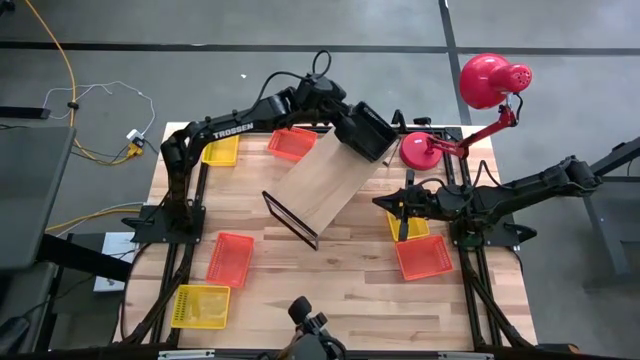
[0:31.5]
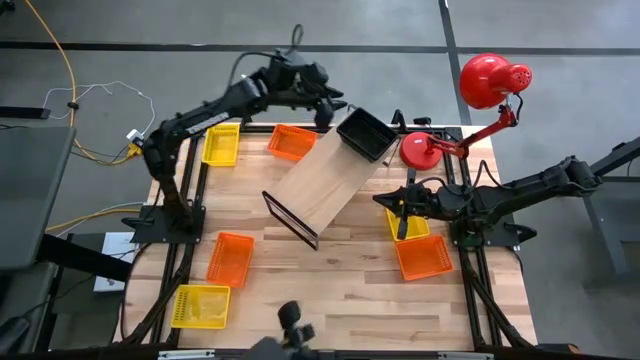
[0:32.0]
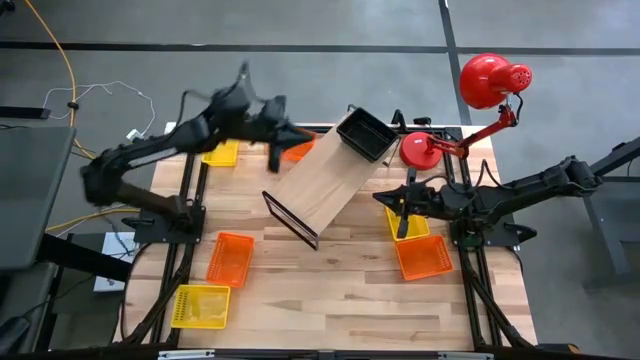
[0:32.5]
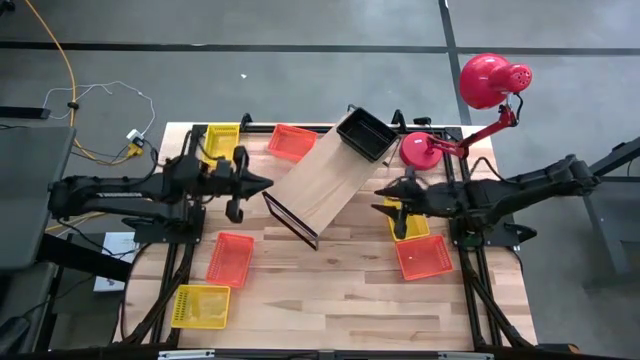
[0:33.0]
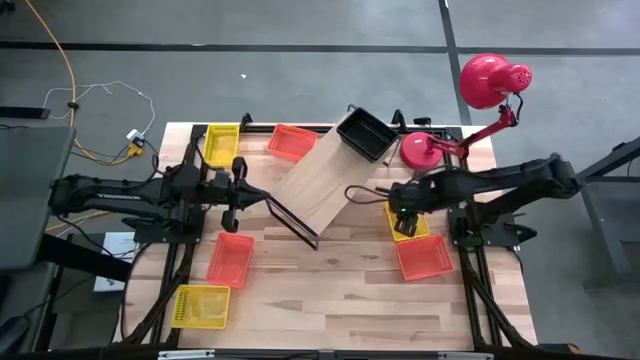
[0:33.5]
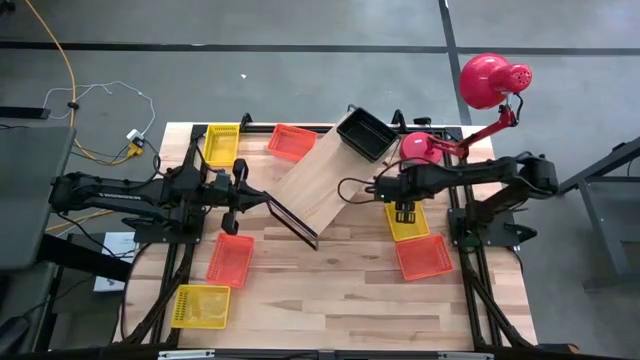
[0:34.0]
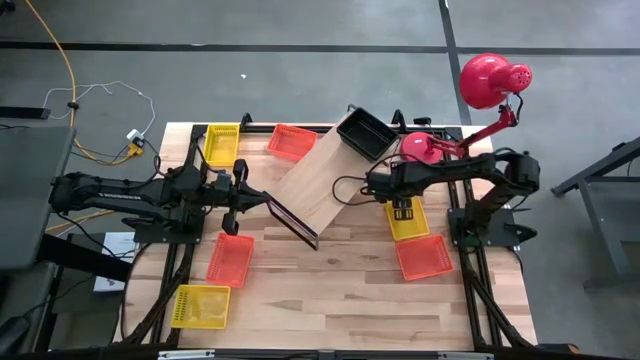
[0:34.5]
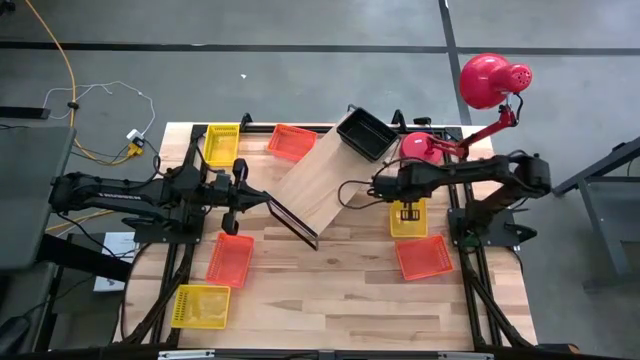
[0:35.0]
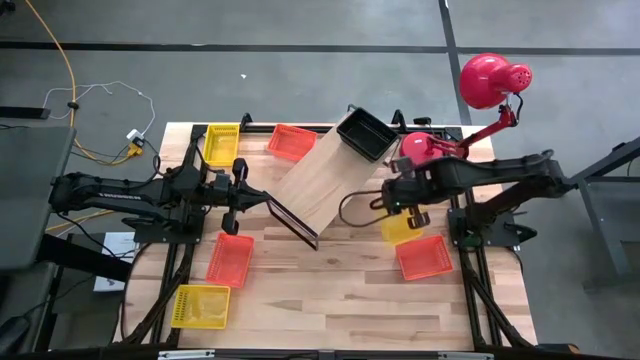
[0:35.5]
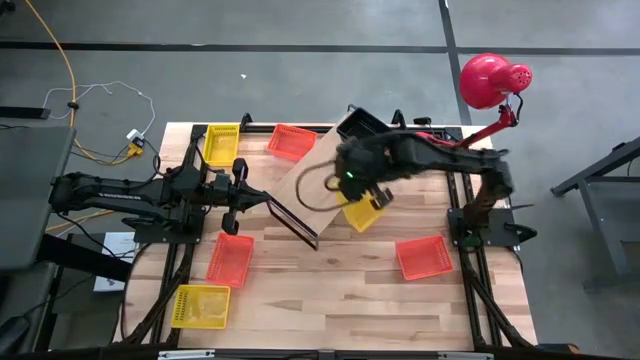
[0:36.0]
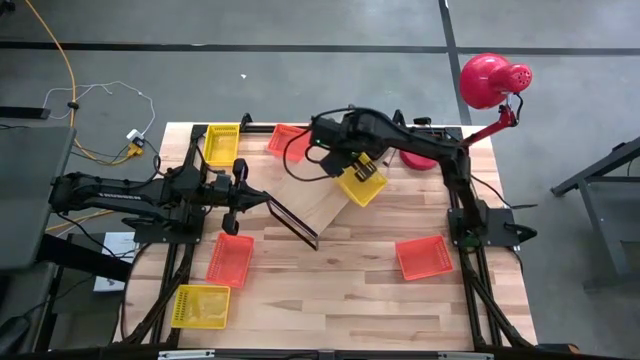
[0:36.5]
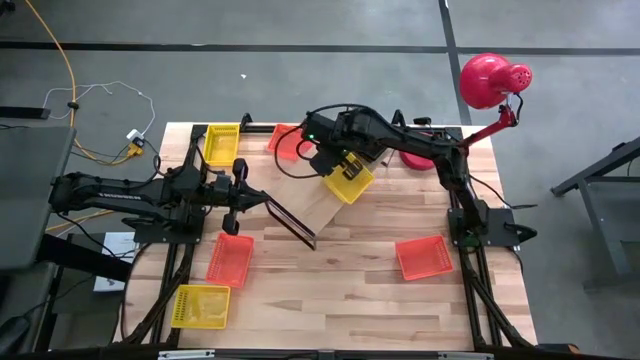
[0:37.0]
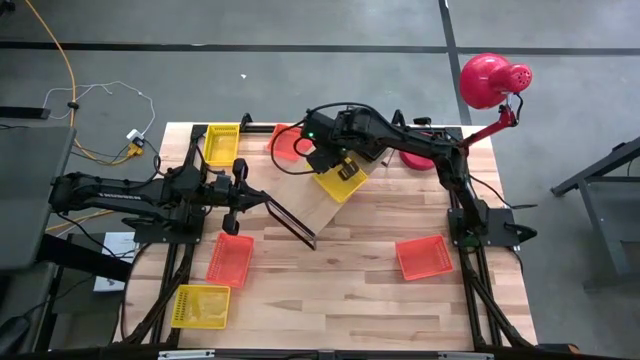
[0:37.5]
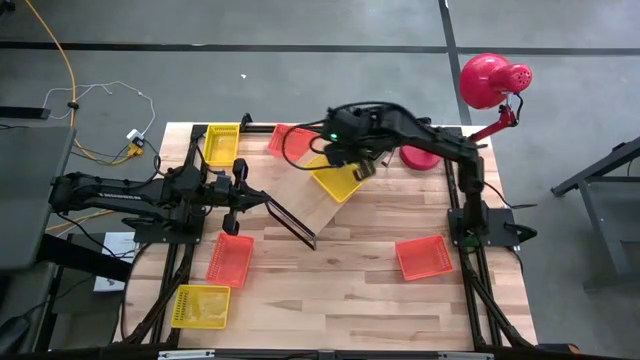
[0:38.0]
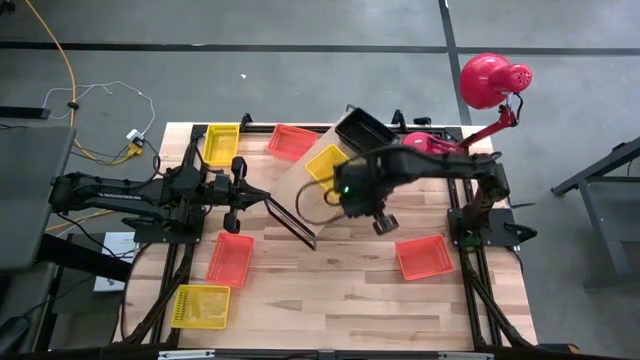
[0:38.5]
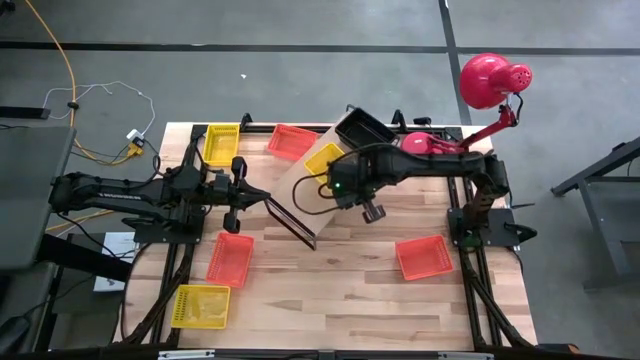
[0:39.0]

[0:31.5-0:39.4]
Task: Stack baskets on shelf by color
Put the middle right yellow basket on the shelf

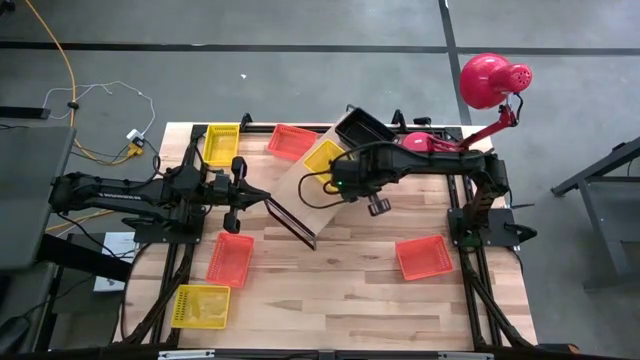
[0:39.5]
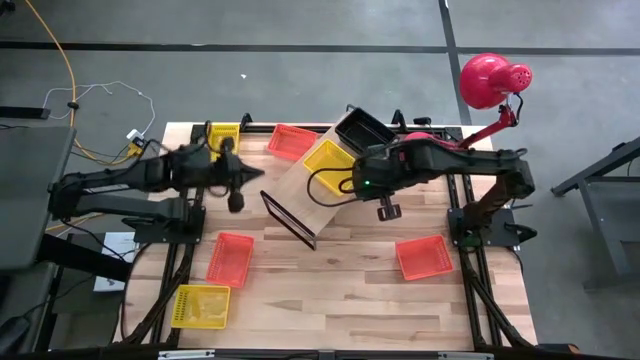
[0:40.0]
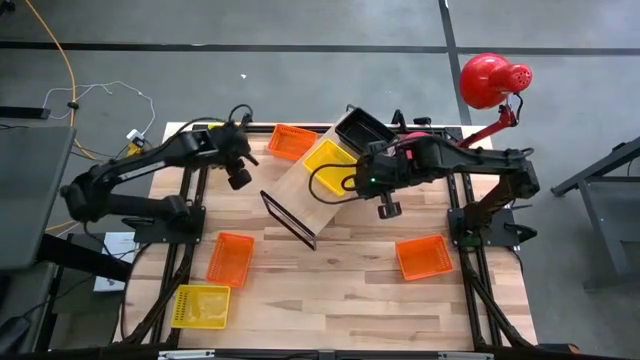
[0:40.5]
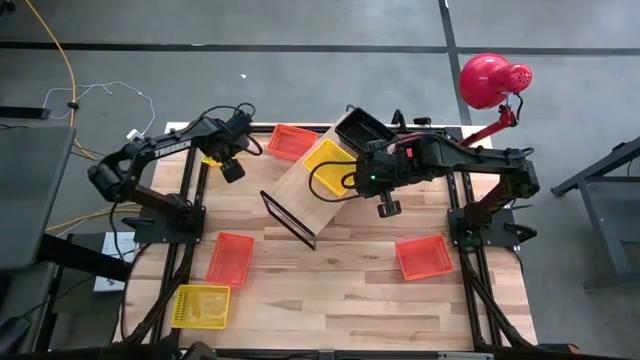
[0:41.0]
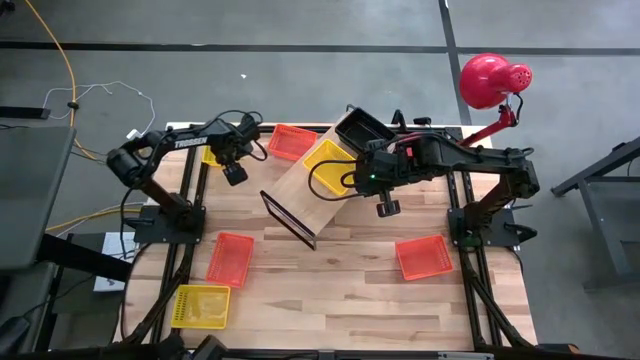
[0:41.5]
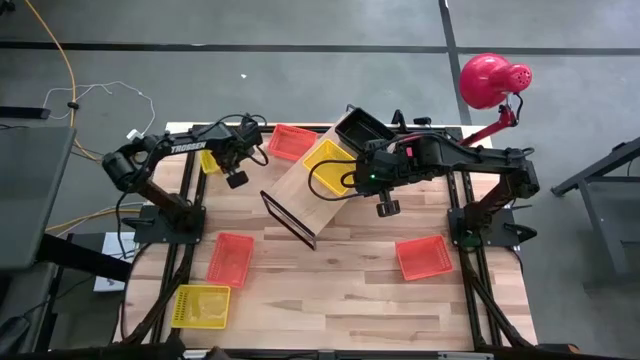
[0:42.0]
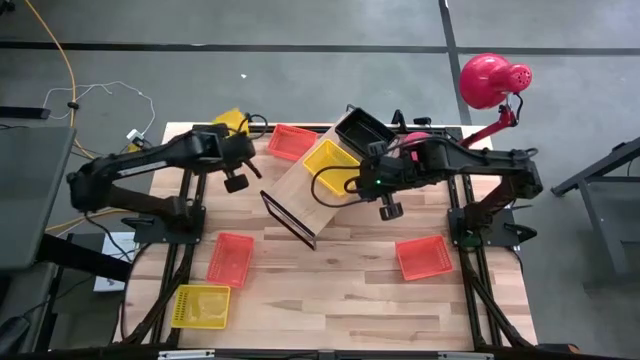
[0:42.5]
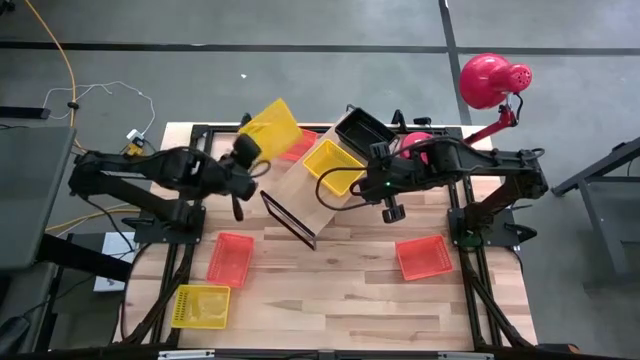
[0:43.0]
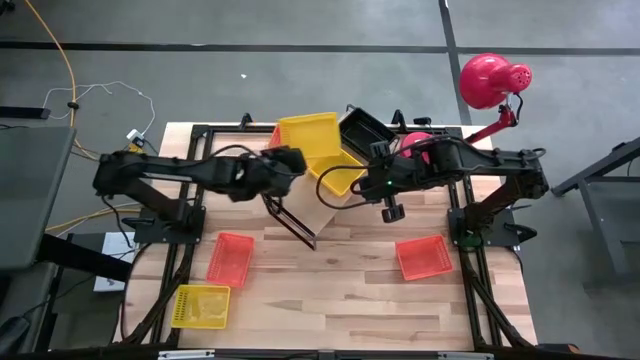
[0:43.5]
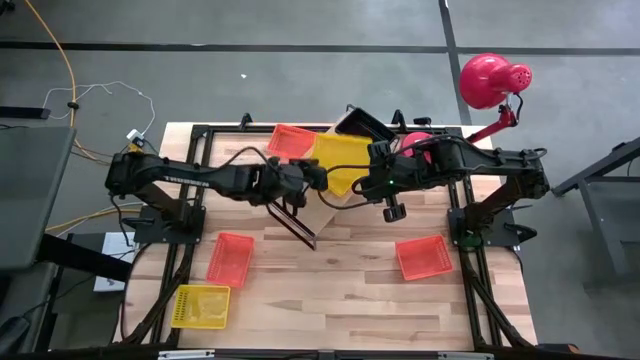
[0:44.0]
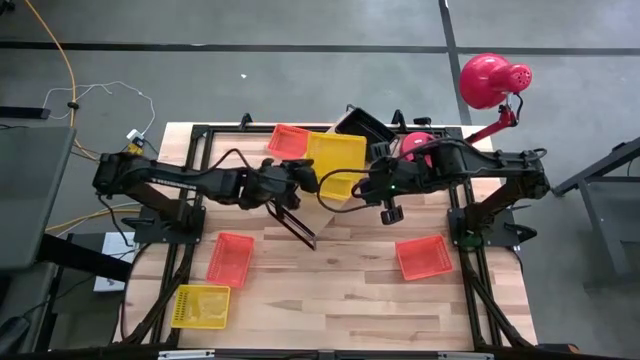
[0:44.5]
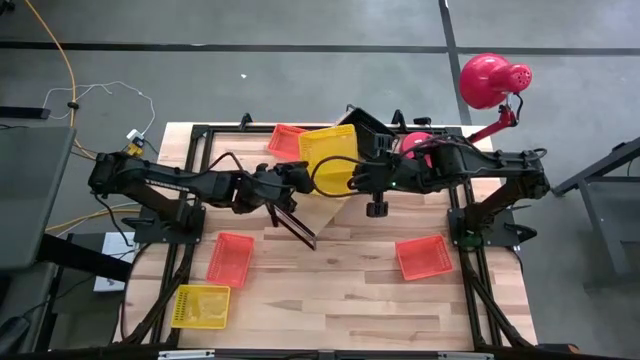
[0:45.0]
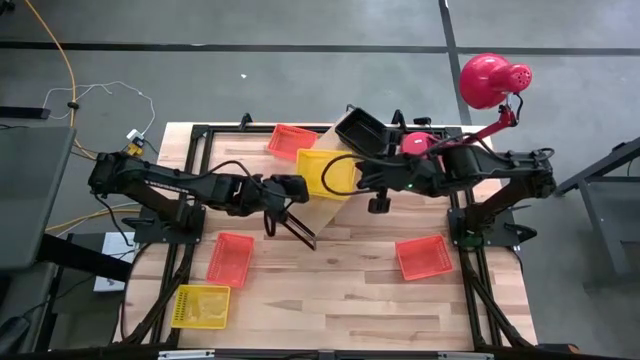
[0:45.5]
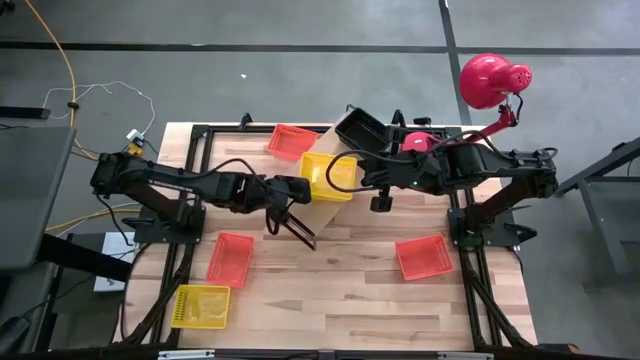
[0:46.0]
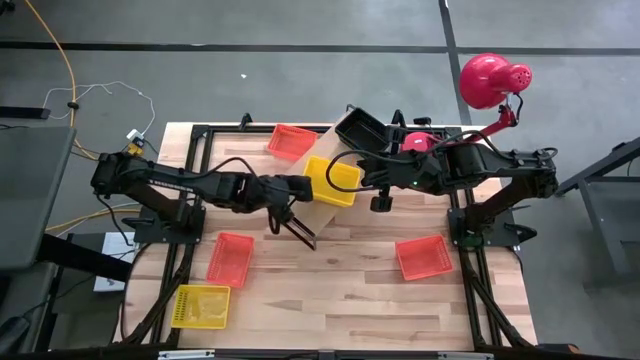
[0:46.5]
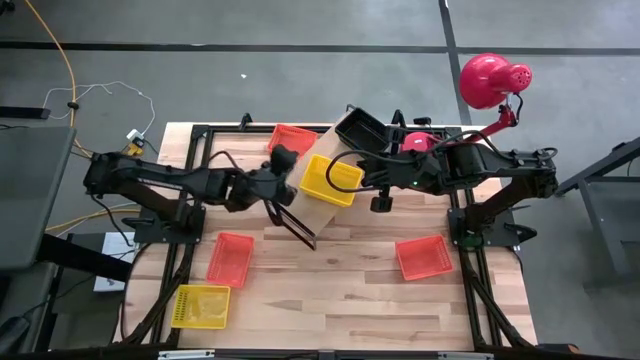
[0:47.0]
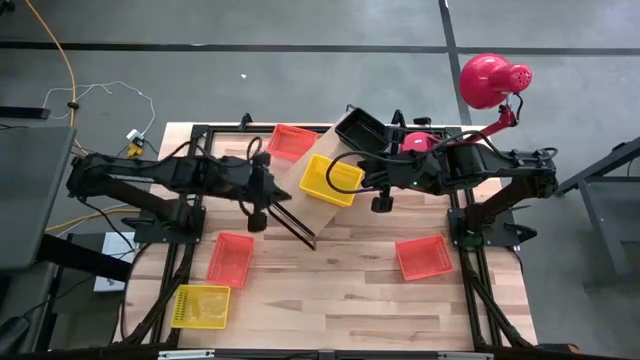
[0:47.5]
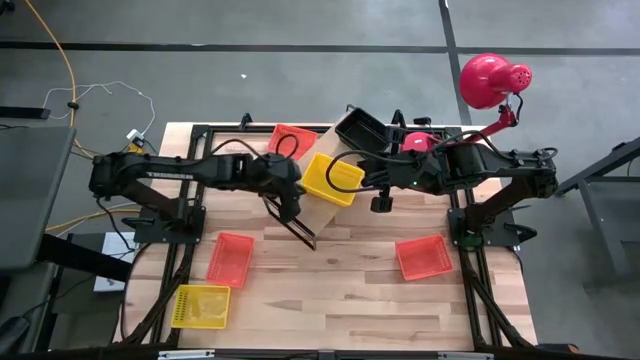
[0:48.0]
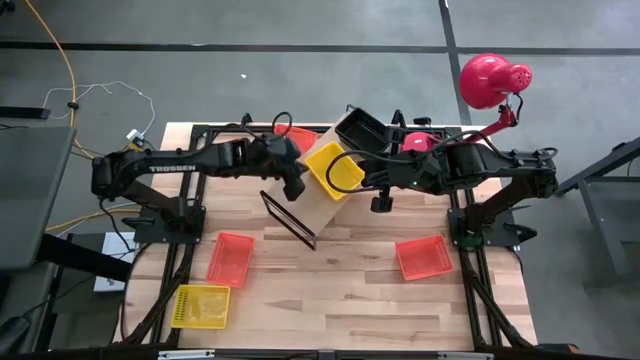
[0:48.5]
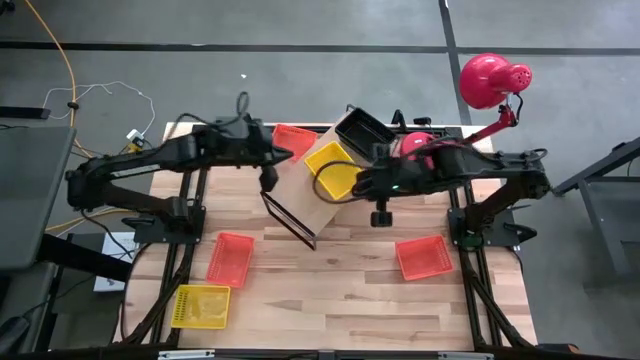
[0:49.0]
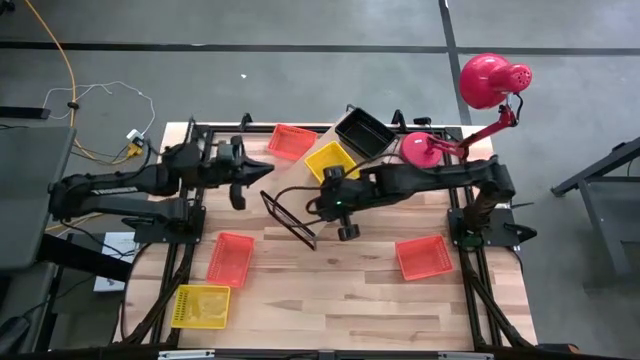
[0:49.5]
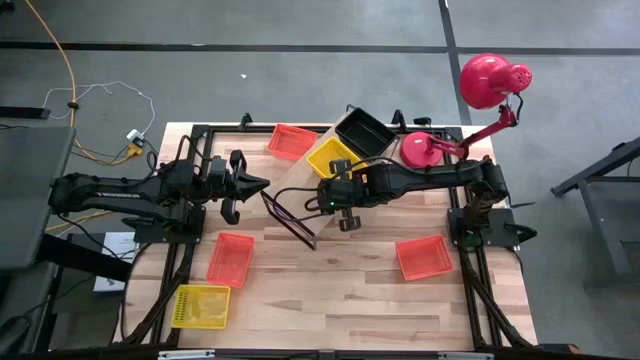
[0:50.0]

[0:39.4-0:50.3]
Stack the top yellow basket on top of the yellow basket on the shelf

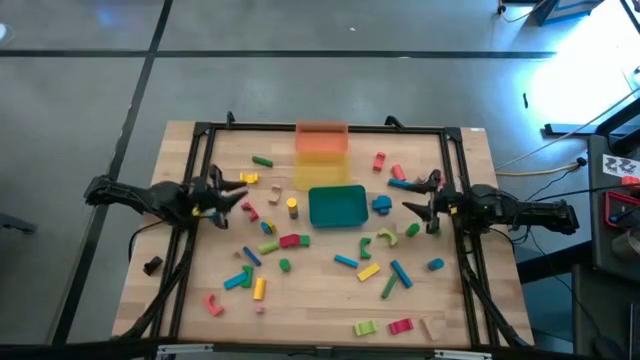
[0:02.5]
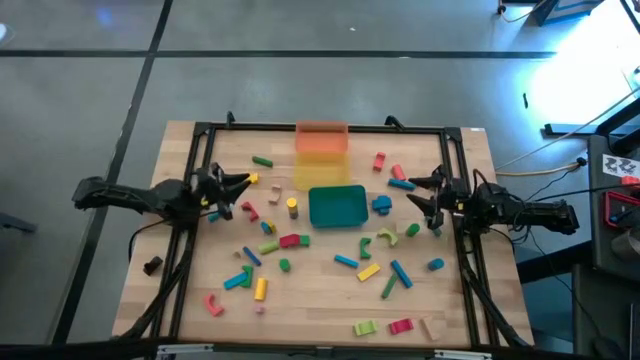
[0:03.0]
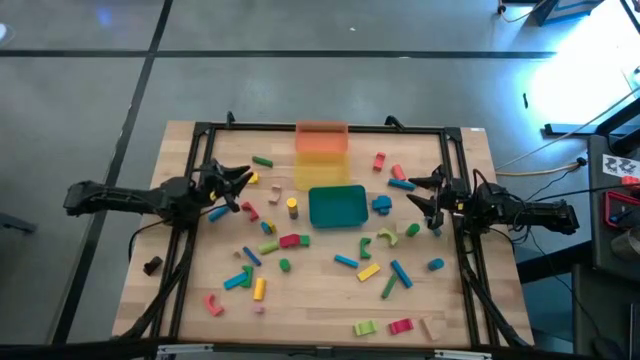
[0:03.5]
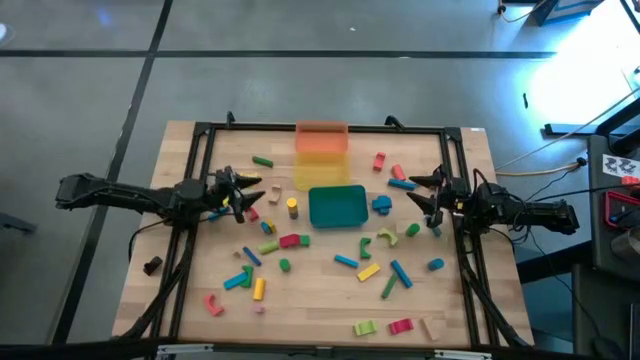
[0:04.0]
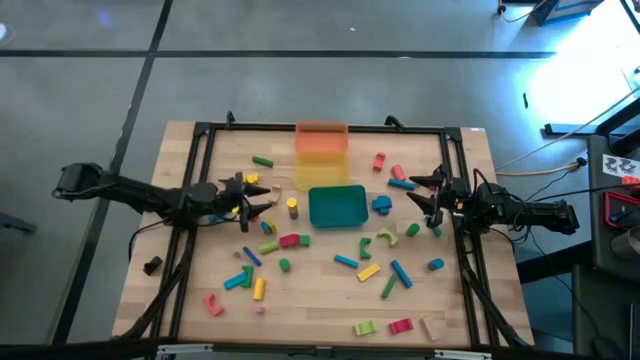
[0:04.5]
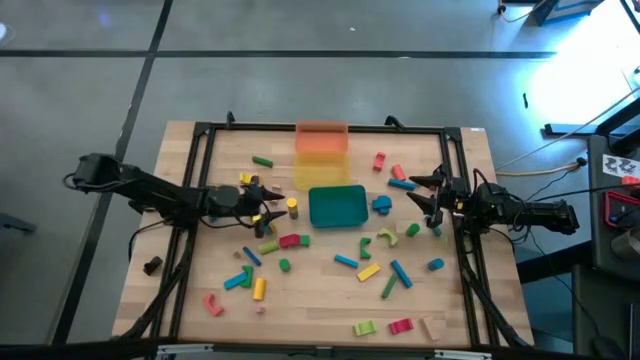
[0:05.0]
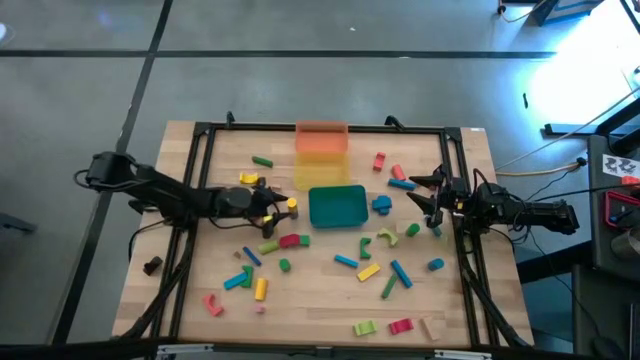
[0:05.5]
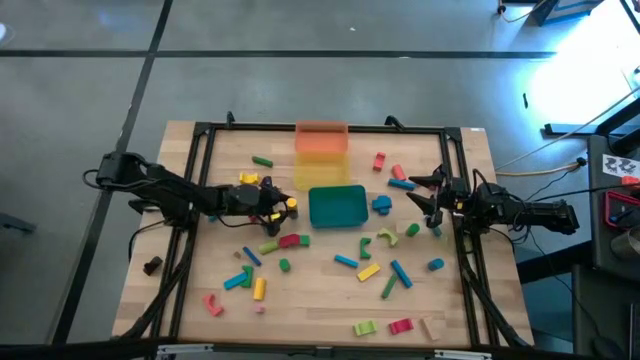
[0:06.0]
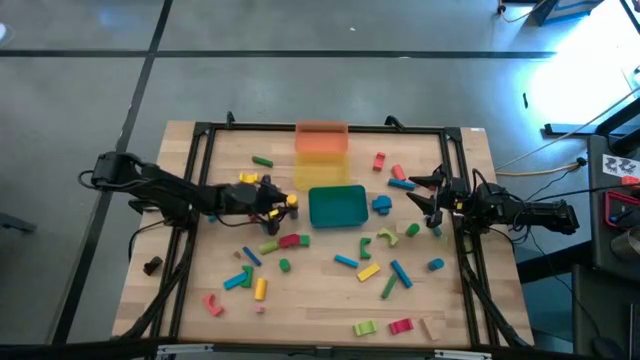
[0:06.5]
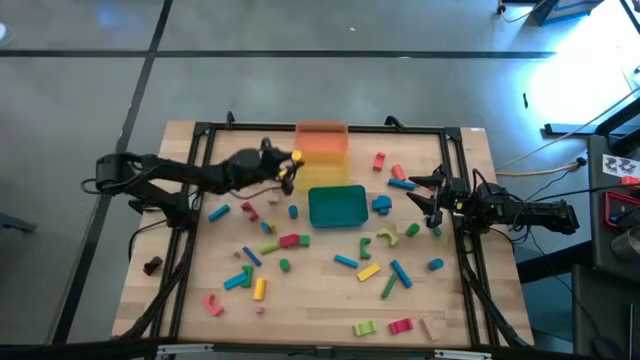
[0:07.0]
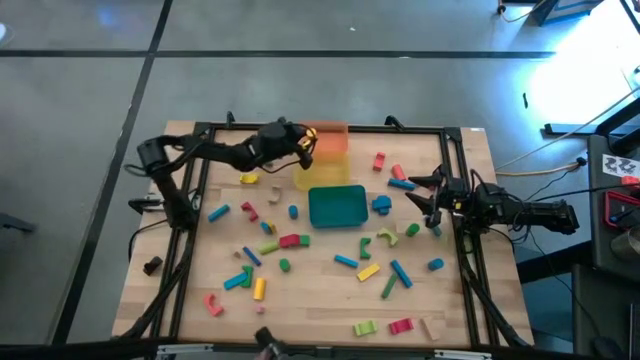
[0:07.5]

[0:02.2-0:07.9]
Task: Sort blocks by size
Put the yellow cylinder block into the orange bin
